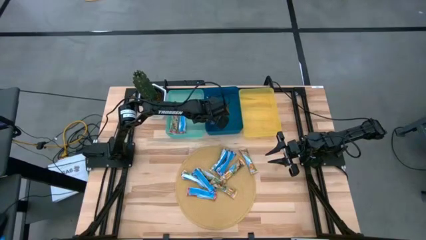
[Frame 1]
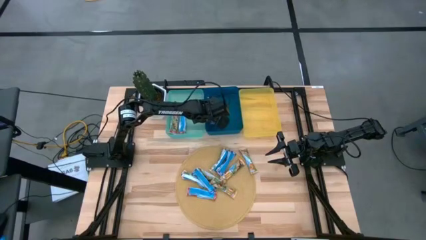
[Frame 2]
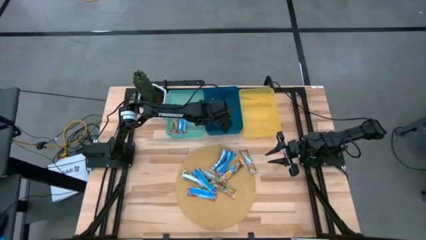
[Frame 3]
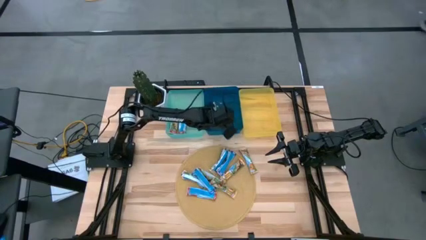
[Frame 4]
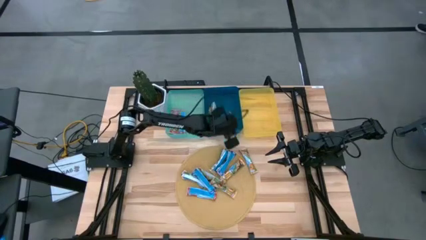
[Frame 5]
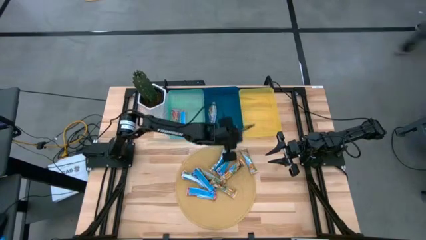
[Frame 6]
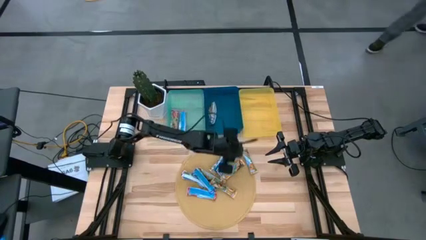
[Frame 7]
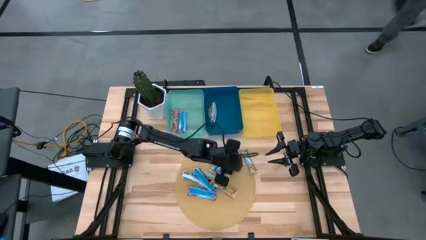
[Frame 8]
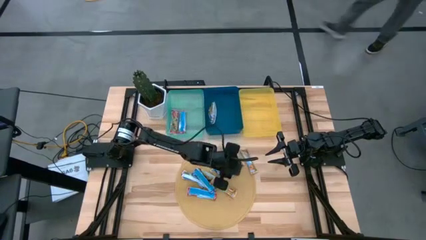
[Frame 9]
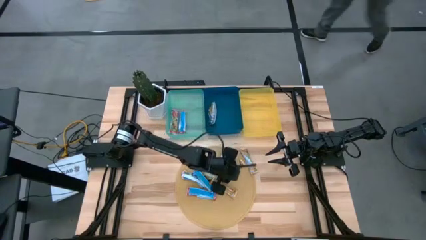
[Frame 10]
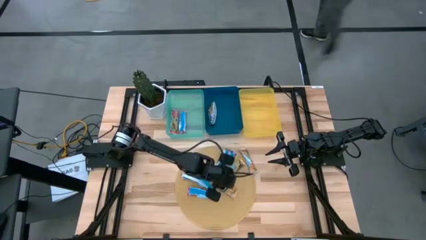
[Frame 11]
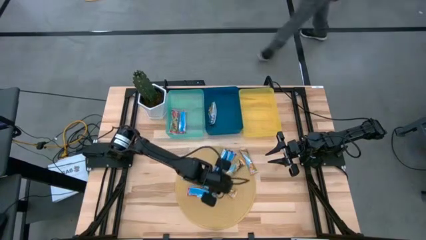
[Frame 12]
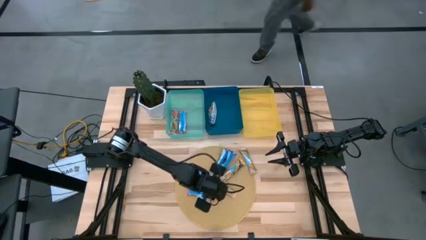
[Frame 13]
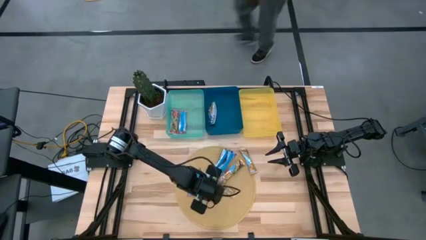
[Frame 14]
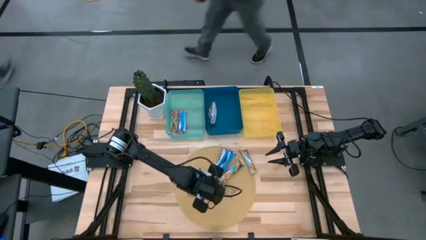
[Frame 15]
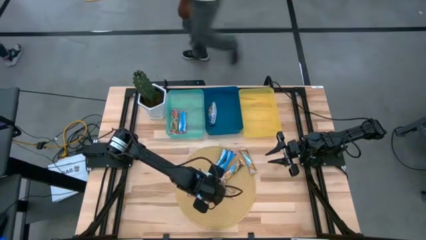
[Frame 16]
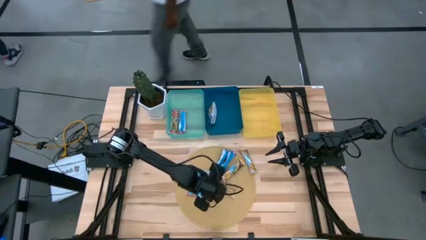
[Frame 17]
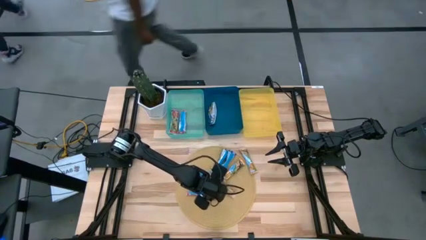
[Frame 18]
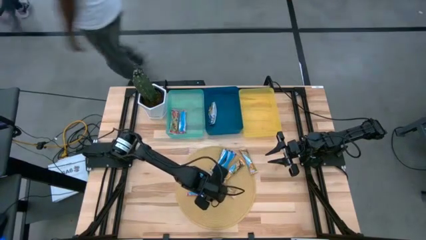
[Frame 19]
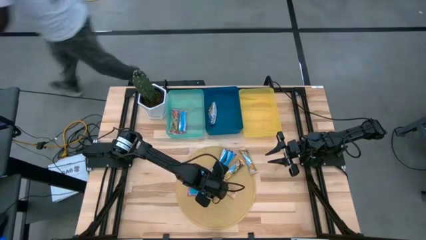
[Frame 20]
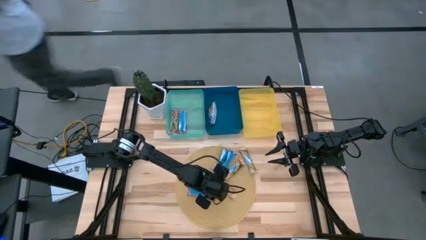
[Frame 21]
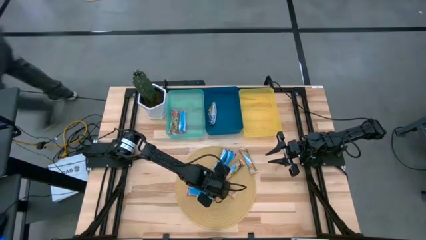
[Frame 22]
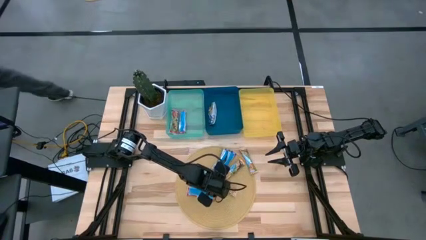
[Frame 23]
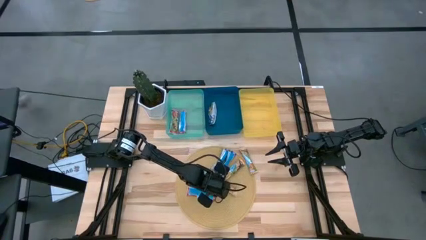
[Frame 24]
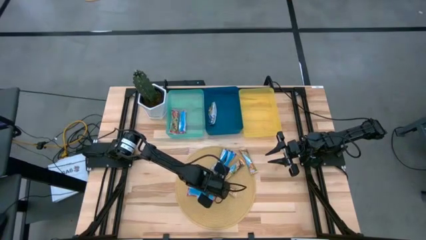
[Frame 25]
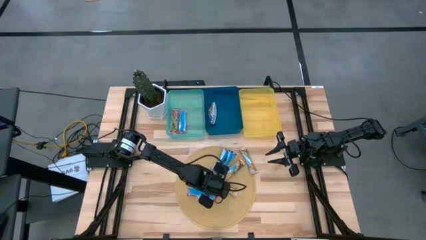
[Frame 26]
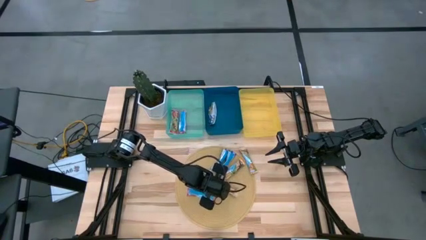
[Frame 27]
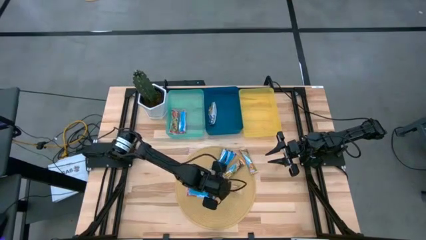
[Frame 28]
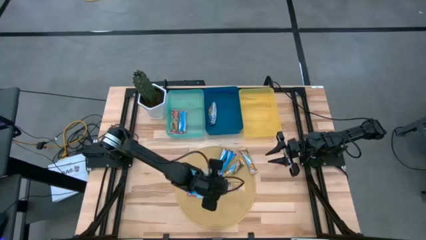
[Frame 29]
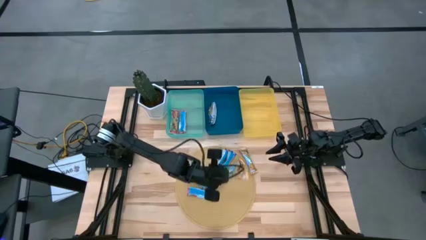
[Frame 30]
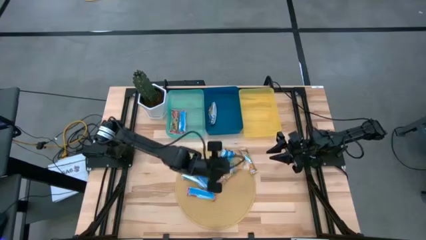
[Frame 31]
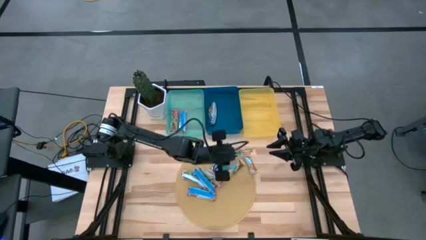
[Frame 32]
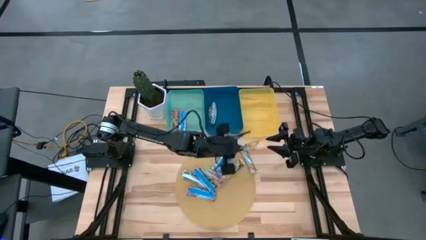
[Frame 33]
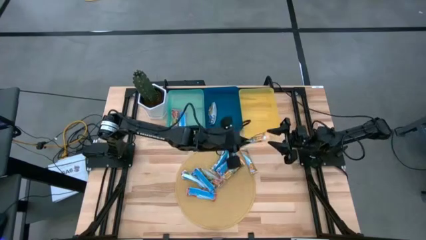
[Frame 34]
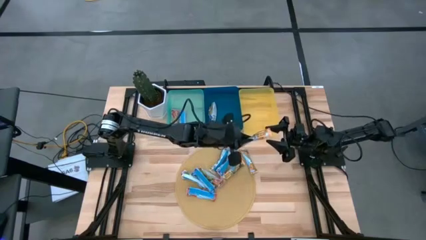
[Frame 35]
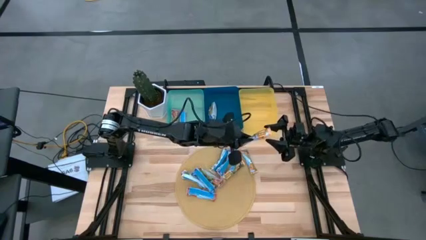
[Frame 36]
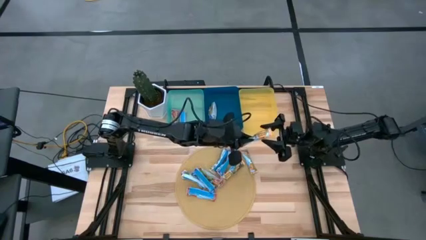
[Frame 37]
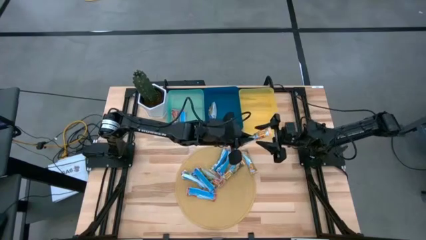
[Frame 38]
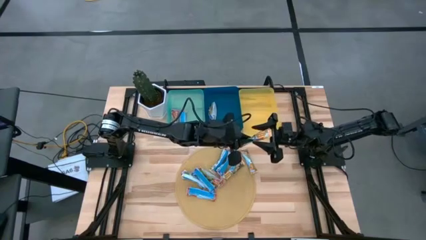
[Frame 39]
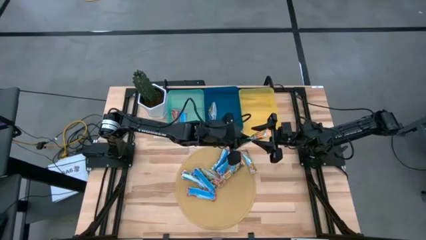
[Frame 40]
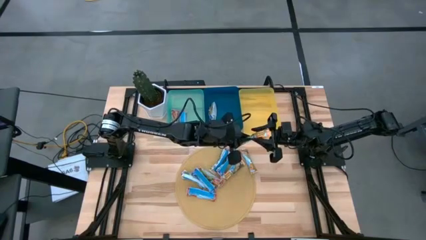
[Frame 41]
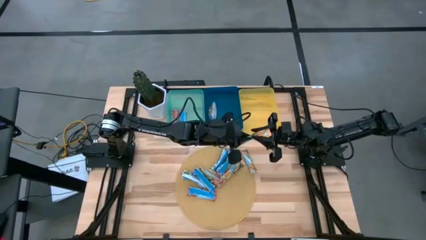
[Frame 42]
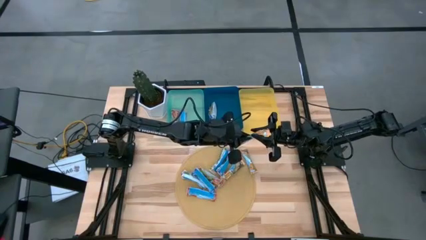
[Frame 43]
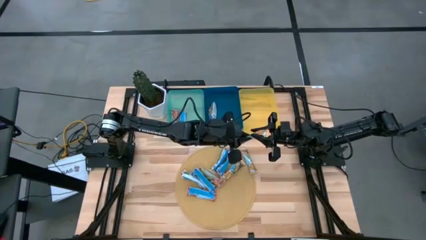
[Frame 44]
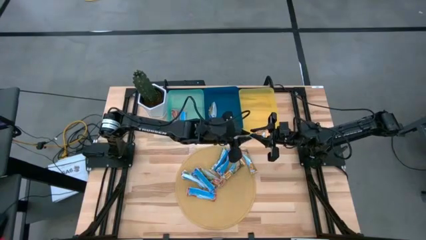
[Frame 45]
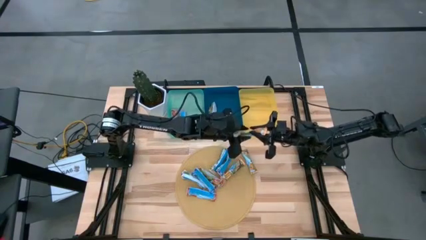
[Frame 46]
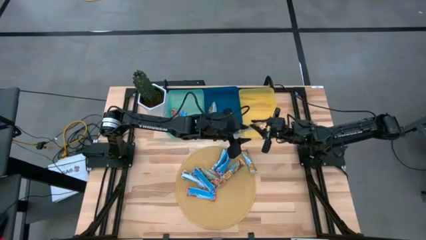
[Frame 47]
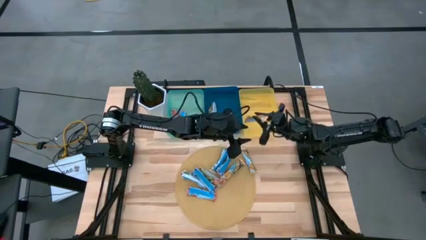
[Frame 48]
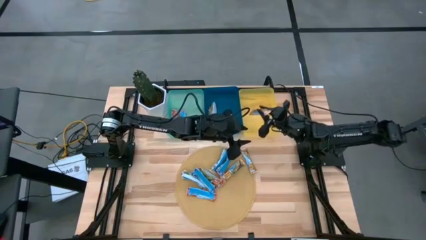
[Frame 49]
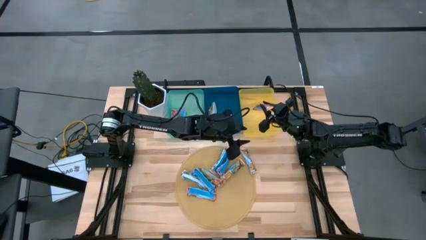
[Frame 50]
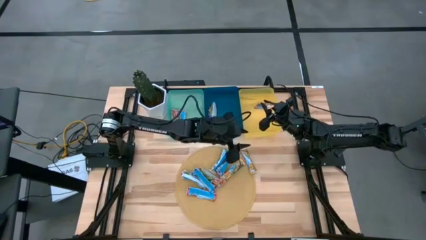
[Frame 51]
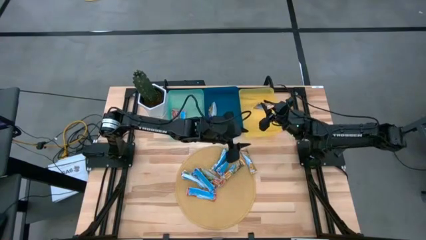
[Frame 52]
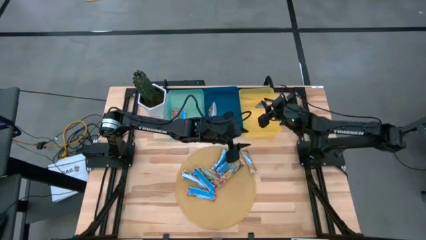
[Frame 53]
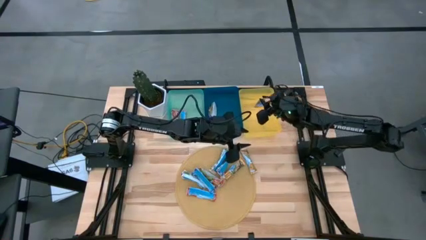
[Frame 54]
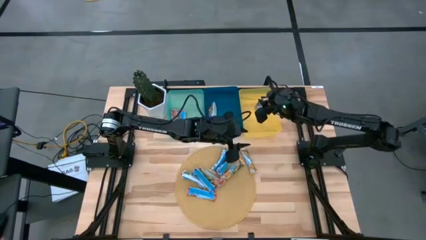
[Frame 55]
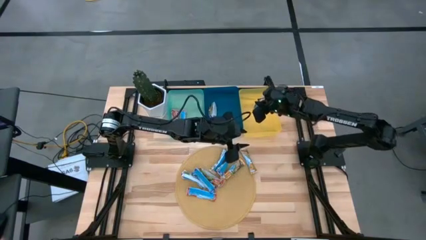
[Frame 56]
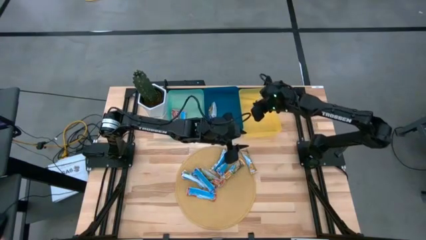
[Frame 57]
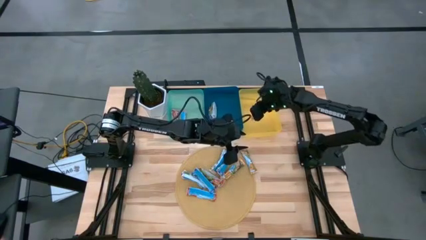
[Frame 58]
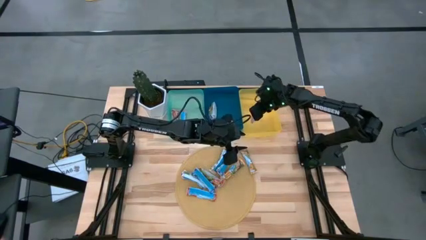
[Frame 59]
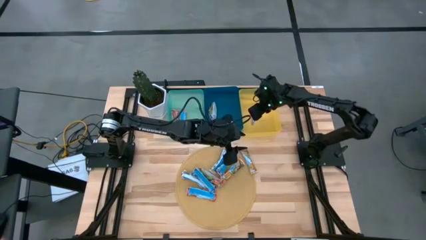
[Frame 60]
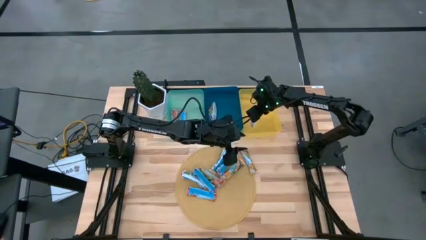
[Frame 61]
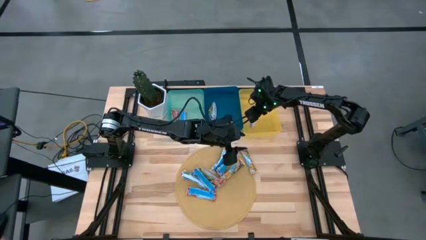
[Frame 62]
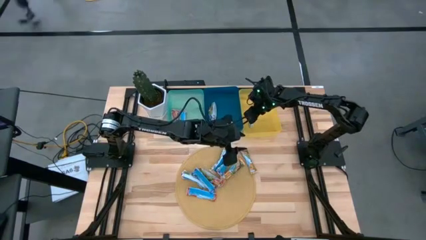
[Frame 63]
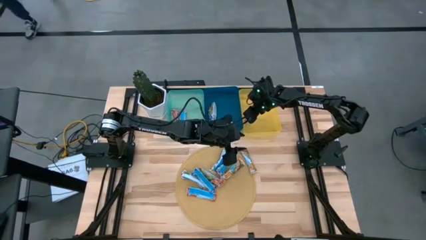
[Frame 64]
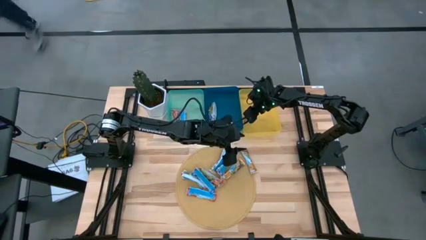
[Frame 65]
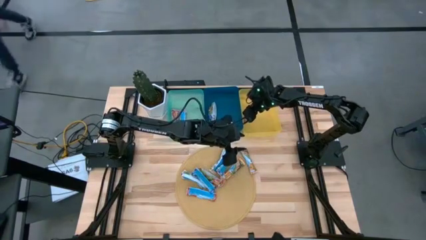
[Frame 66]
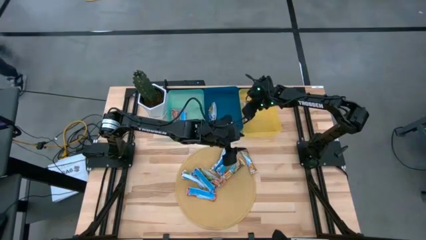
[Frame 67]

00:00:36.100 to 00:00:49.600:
Task: Pick and place Granola Bars by type
Put the yellow granola bar into the yellow bin

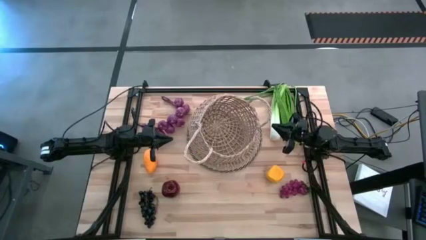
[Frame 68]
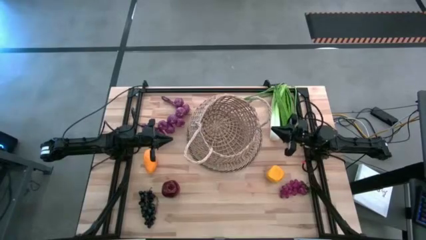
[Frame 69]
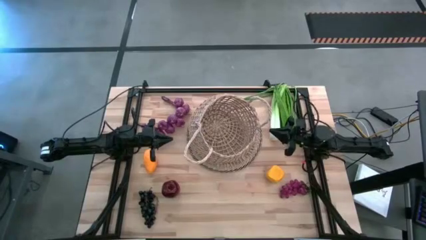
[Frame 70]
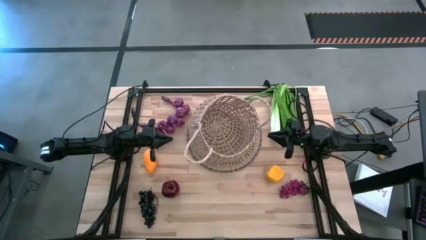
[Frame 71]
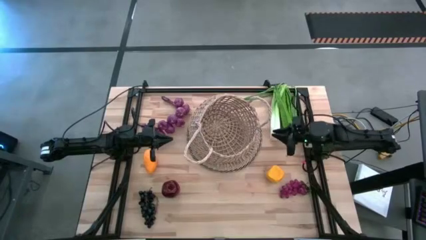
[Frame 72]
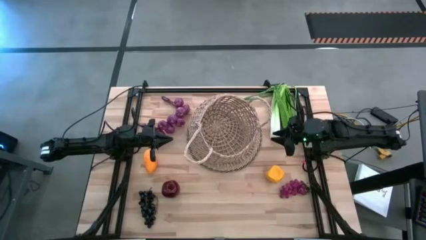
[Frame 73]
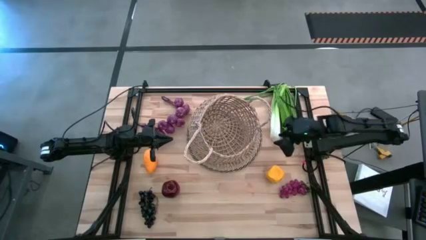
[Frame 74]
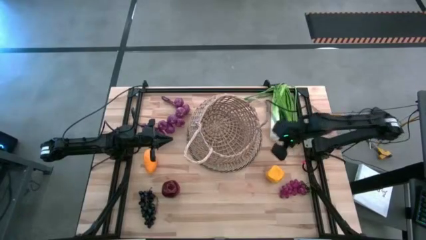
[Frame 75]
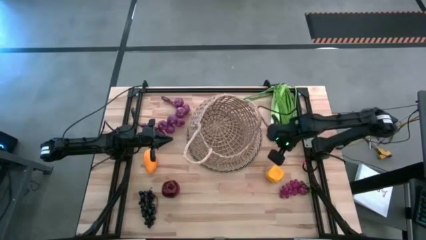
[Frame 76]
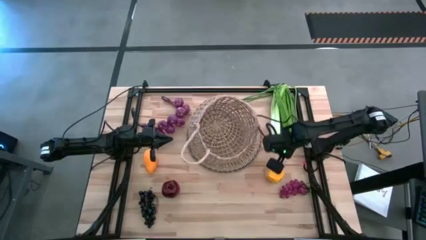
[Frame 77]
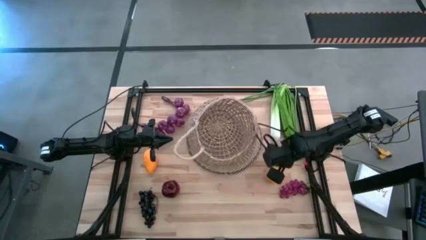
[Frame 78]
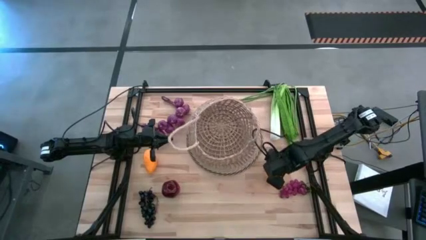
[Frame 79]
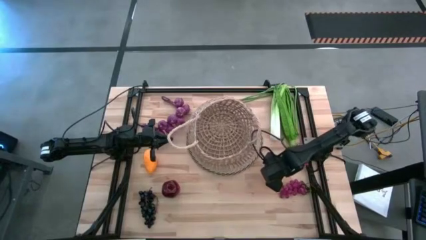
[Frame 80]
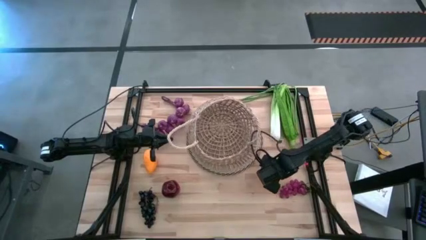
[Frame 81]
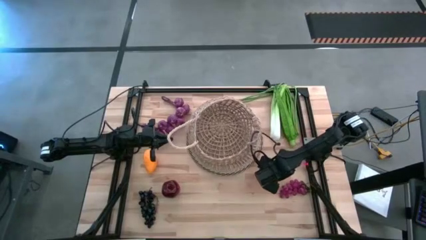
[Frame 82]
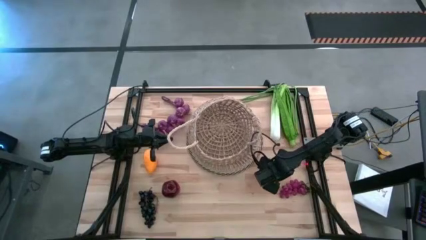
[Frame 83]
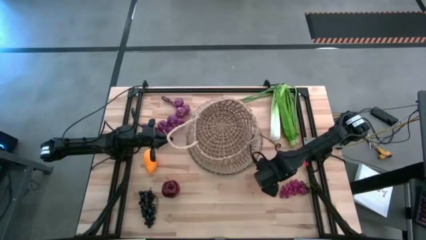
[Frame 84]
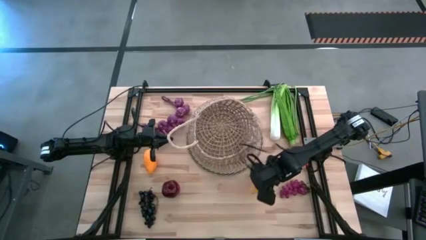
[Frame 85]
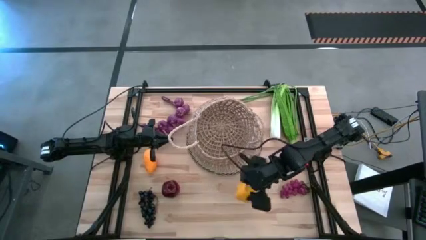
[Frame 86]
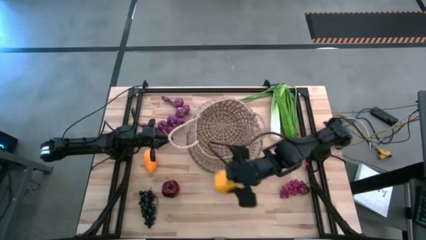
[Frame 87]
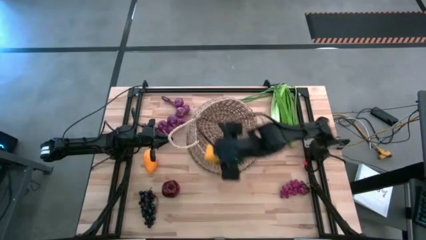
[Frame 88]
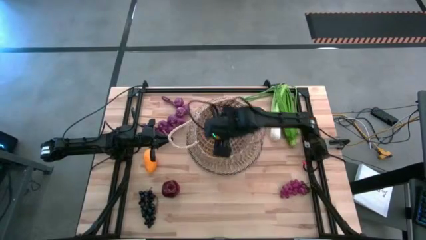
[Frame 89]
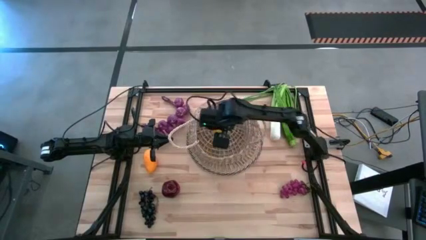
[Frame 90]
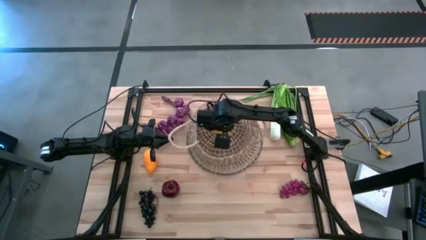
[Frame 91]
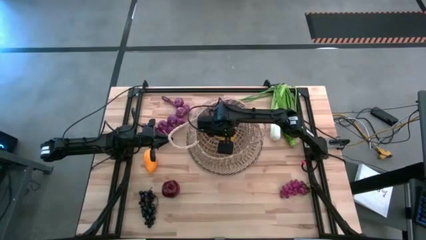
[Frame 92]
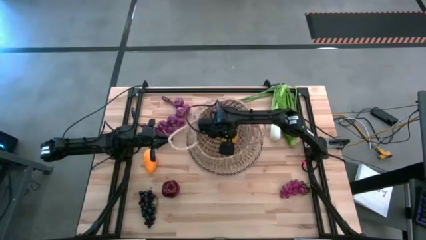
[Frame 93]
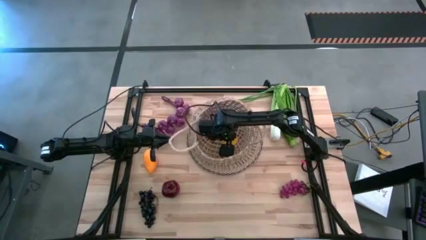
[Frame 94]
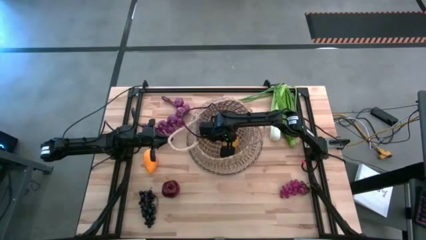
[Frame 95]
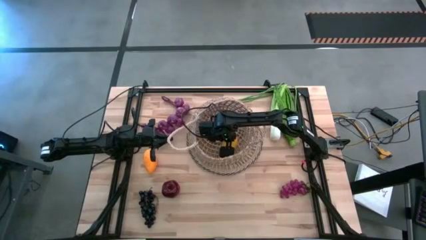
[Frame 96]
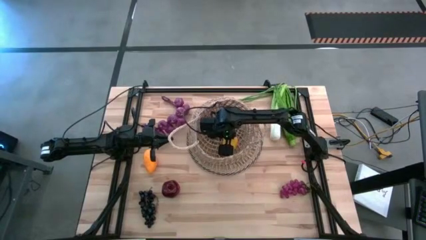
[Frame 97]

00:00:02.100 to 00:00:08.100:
Task: Build produce basket
Put the yellow bell pepper into the basket
